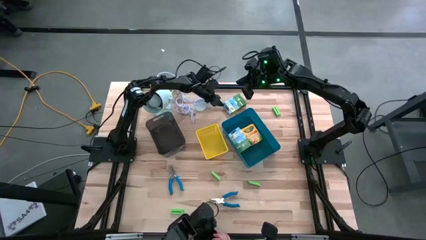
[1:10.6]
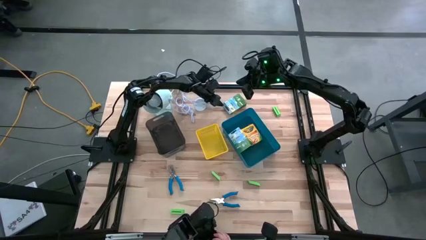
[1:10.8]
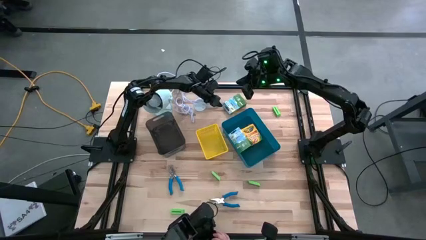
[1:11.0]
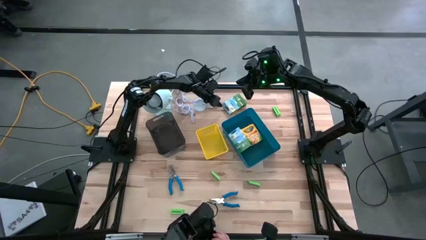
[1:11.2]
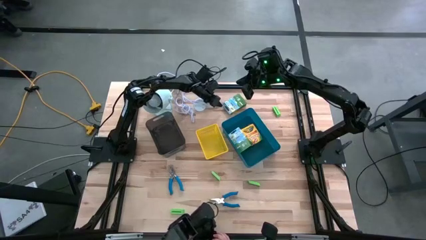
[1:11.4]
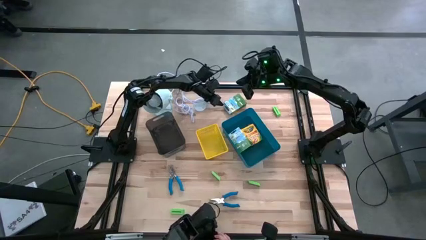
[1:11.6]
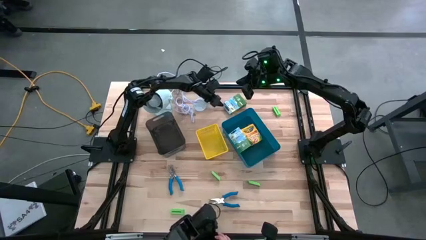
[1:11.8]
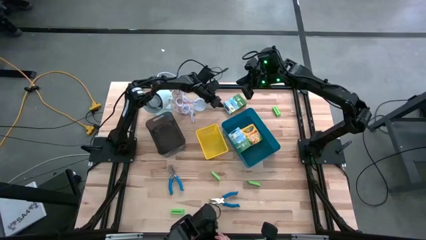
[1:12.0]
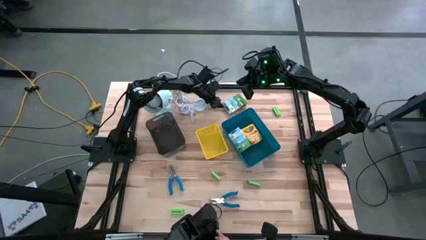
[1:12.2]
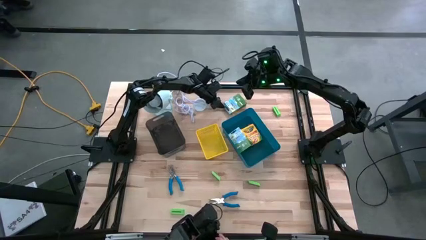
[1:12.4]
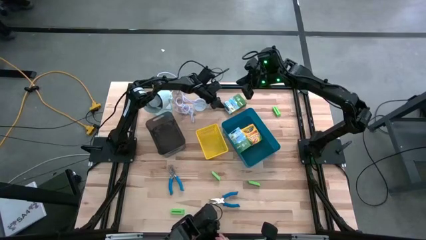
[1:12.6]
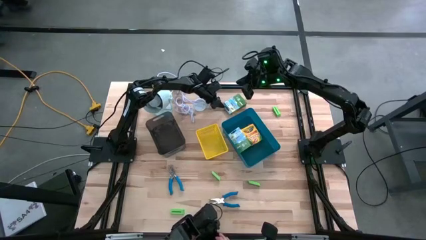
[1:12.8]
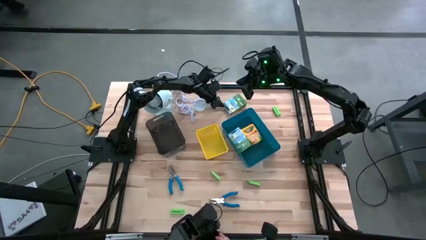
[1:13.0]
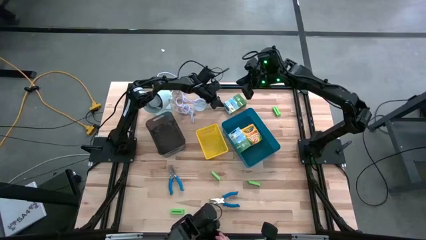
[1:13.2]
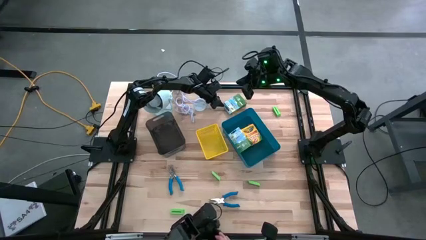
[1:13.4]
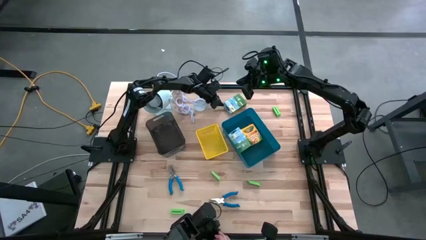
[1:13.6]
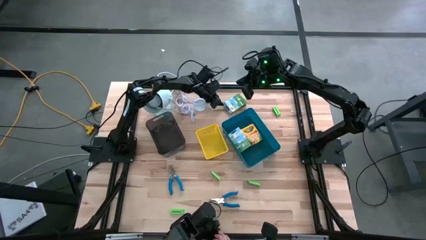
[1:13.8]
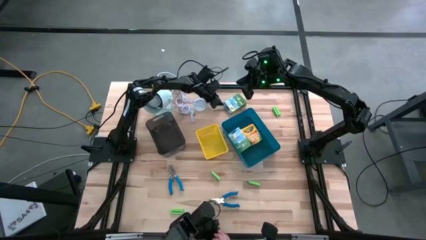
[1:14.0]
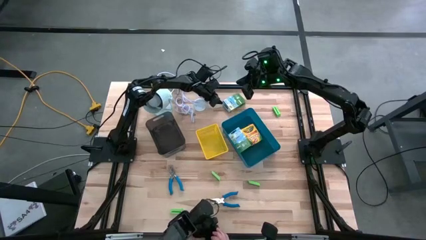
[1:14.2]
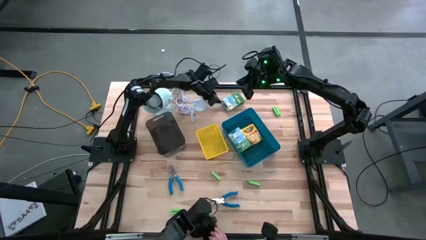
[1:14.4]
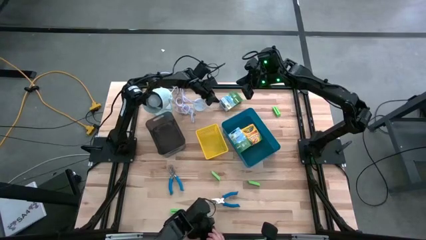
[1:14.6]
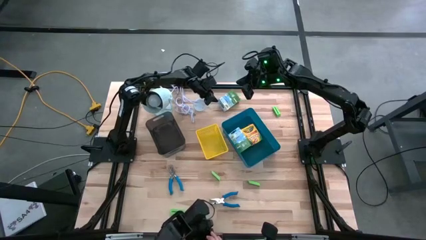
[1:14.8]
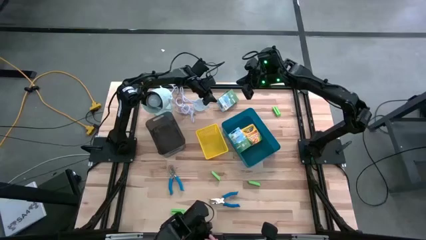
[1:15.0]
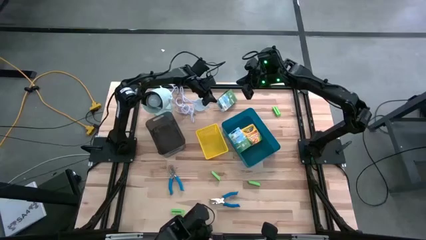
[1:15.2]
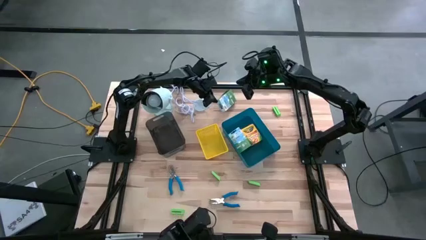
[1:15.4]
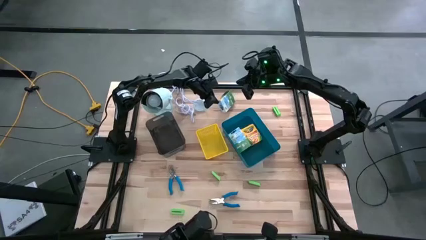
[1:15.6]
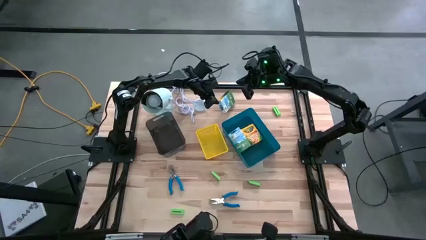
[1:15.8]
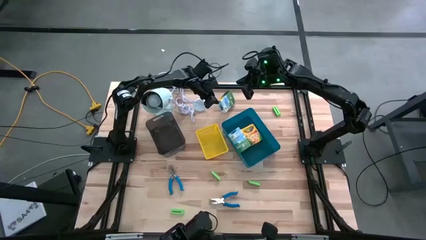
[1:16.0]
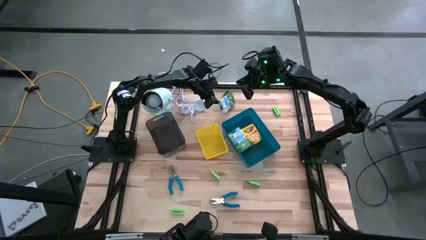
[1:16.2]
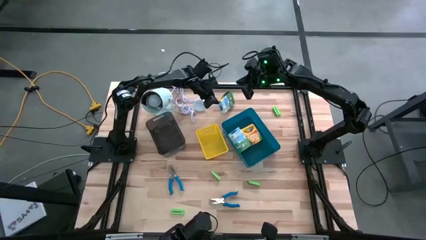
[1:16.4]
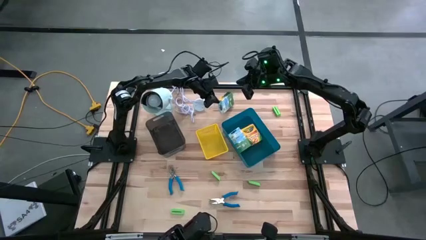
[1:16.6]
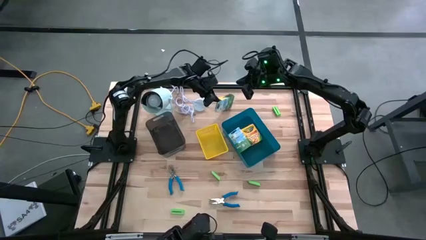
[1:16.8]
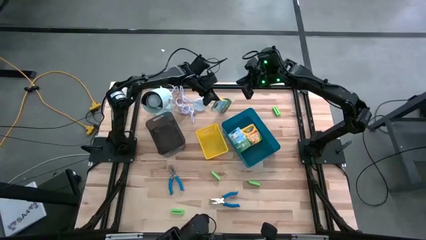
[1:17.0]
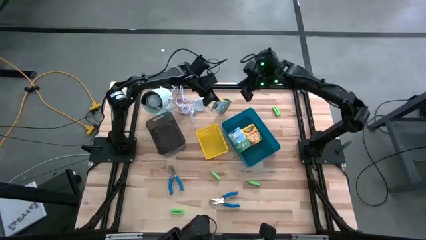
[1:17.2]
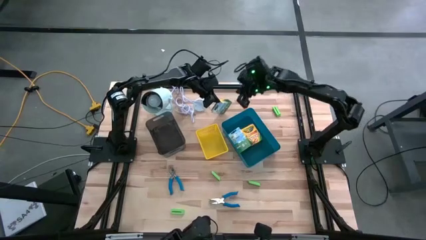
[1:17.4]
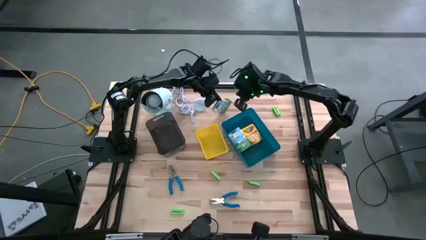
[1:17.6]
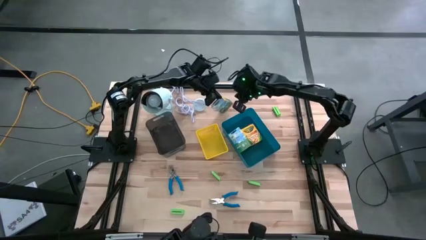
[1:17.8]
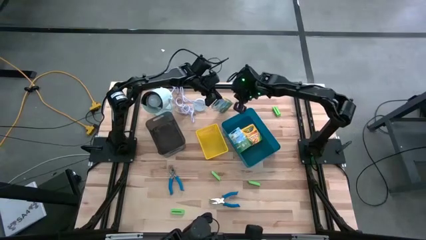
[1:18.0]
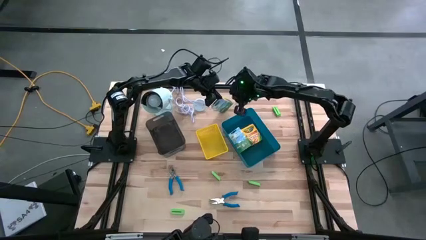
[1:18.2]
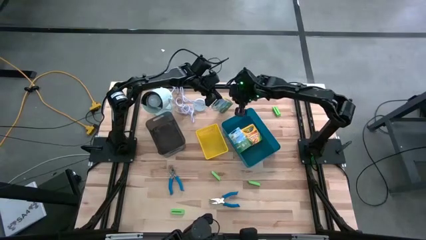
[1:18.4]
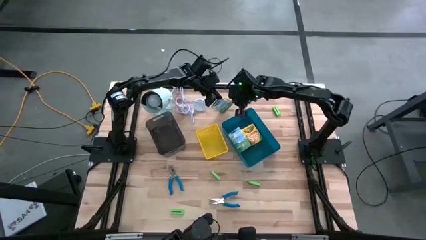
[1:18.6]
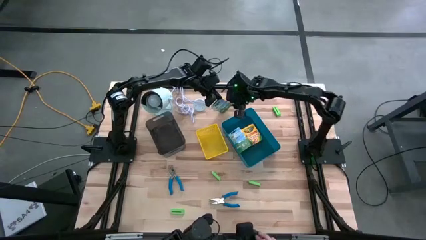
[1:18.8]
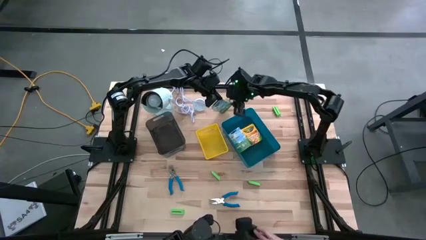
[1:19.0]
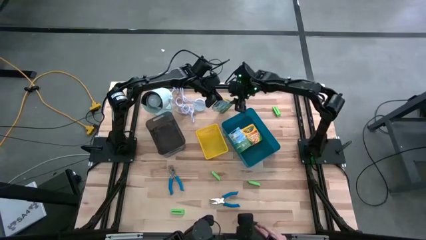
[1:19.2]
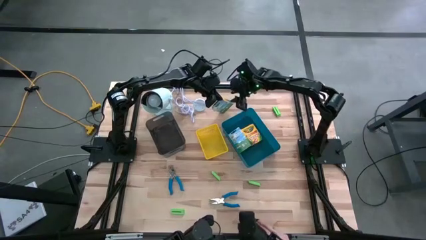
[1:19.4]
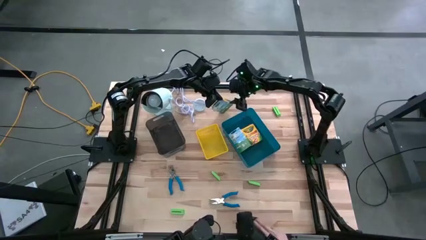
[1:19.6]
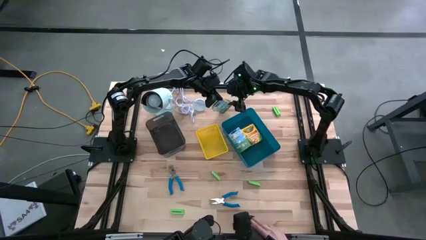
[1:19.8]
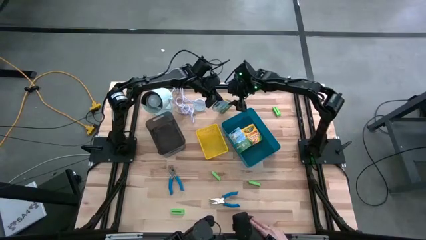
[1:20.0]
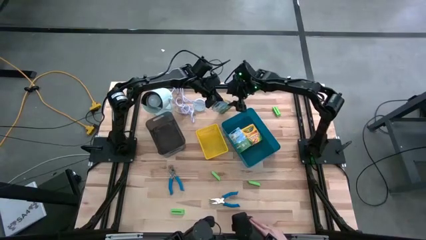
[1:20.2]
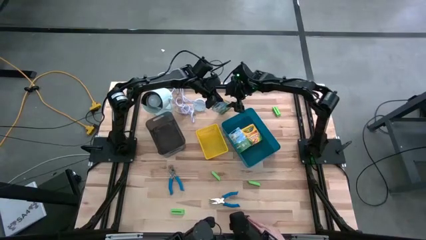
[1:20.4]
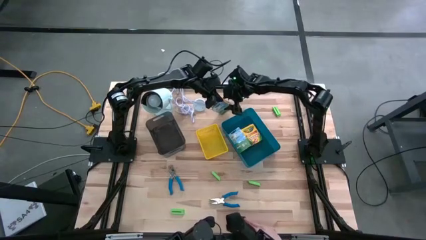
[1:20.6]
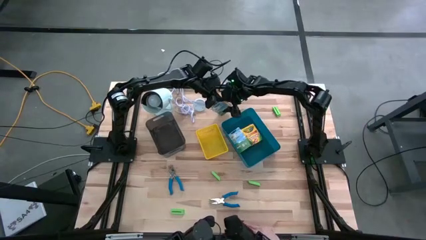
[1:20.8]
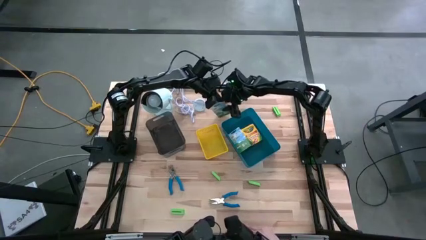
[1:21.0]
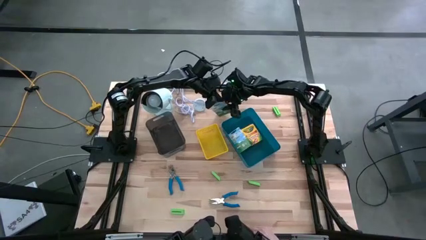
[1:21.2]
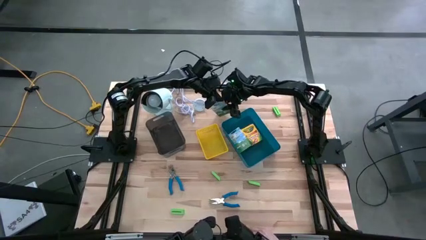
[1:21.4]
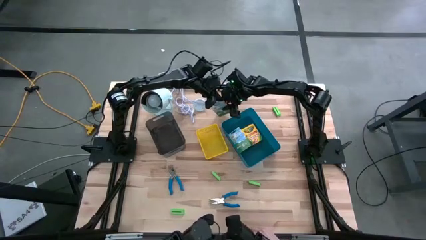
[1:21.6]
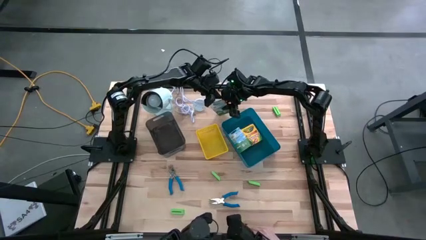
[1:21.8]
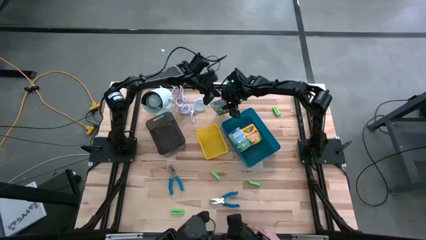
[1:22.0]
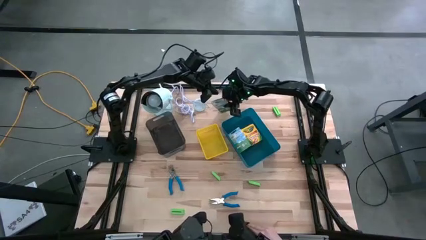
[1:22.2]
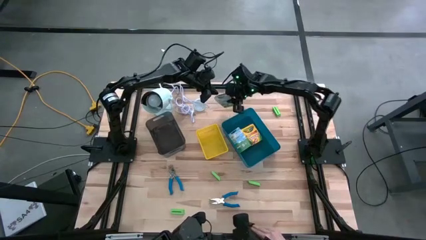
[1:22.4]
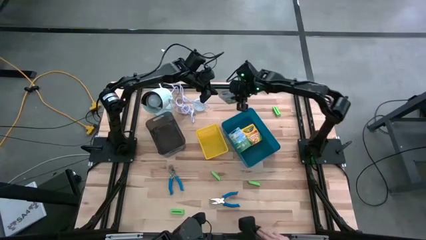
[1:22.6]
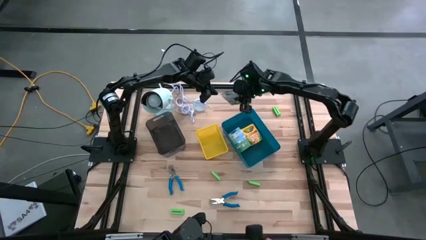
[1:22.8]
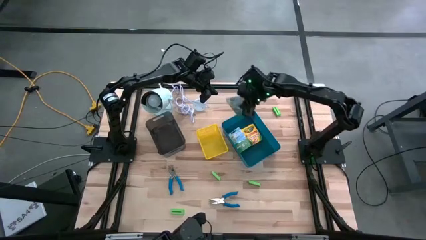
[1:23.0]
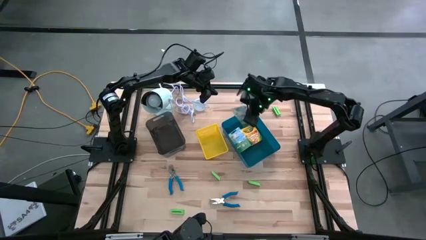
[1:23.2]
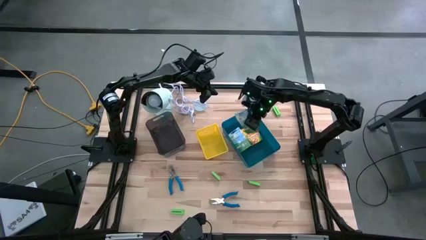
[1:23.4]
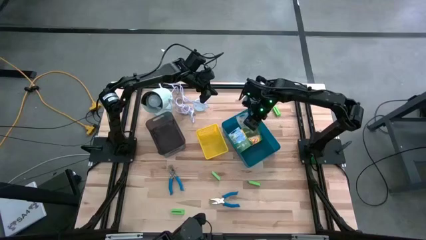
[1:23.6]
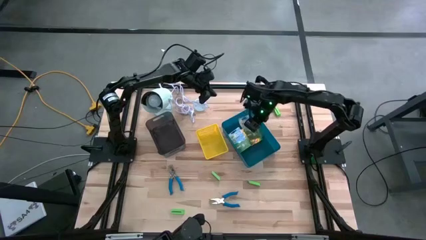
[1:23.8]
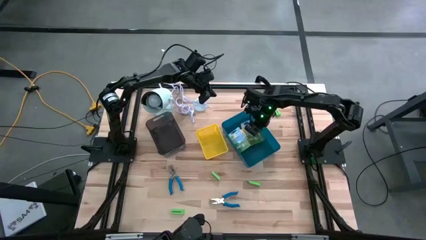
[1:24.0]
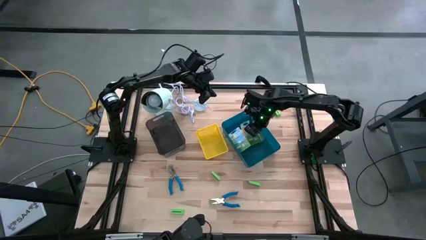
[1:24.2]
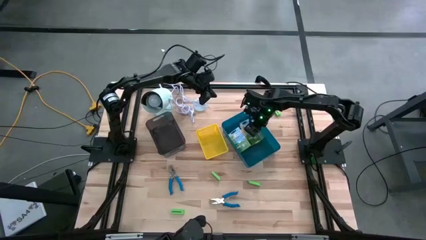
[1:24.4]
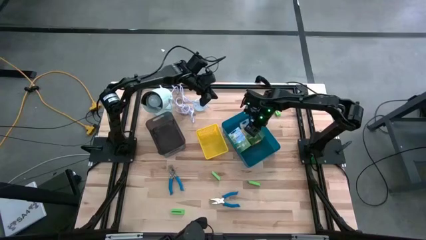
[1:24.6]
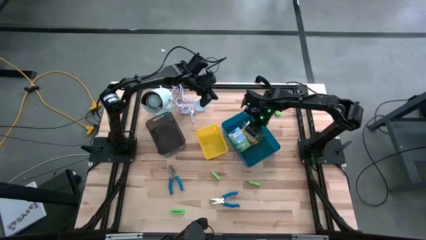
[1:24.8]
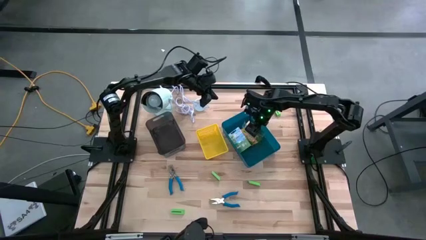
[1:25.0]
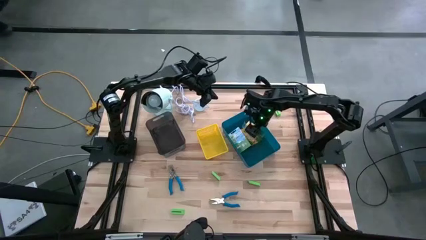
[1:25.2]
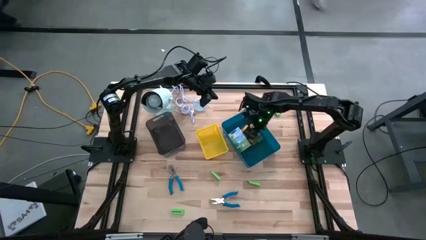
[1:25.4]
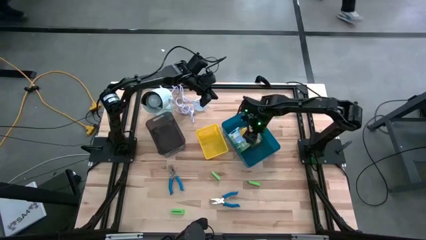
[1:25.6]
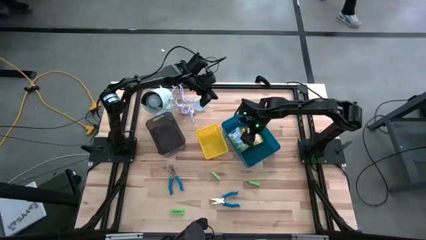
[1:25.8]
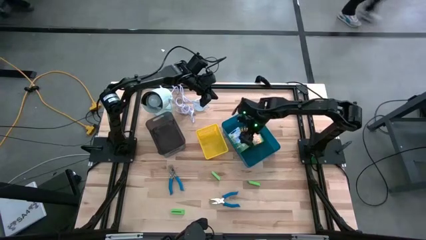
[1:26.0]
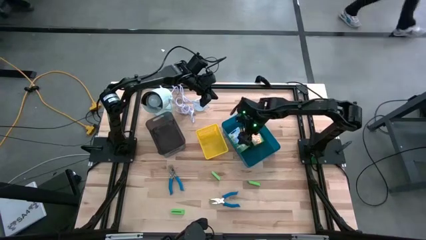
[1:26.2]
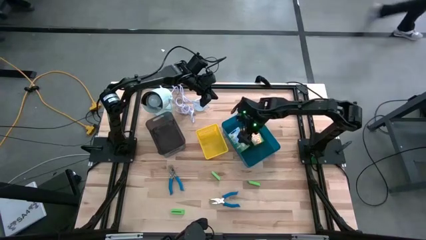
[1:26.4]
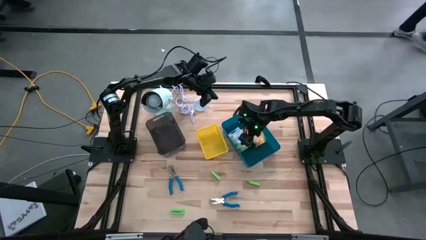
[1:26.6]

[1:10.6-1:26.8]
Task: Pick & Place School Supplies
Put the crayons box into the blue bin
